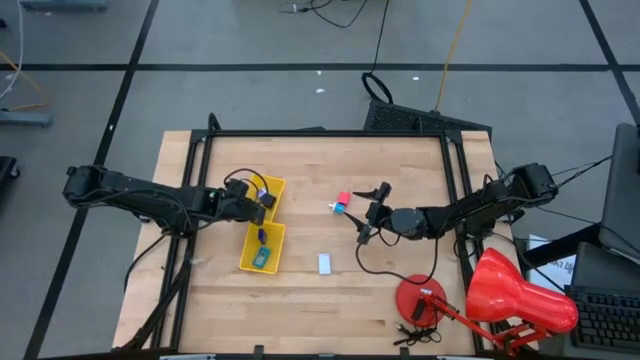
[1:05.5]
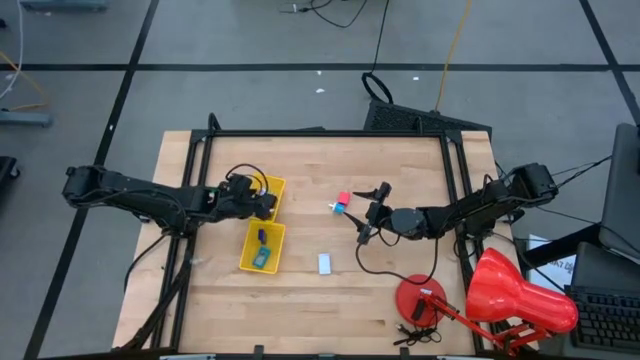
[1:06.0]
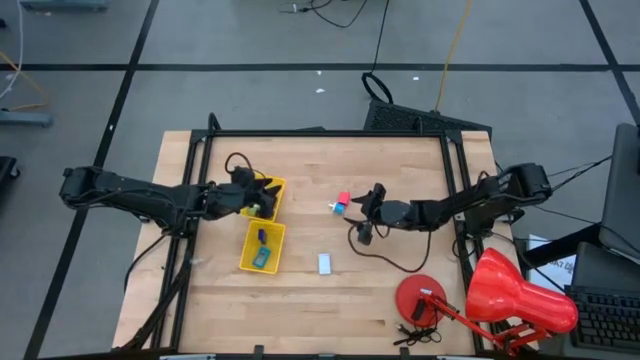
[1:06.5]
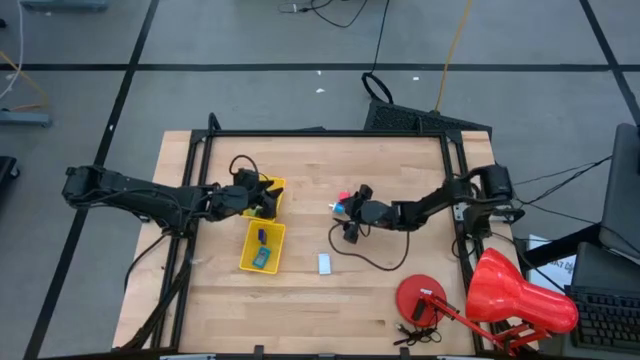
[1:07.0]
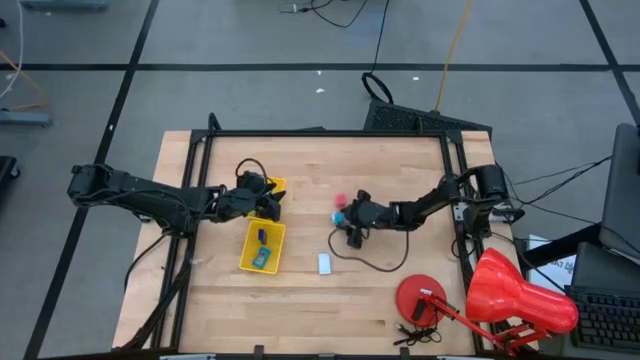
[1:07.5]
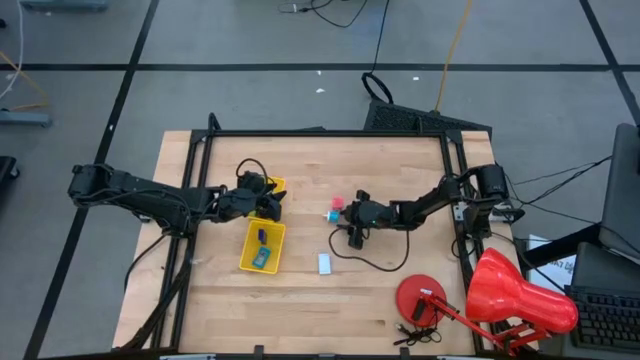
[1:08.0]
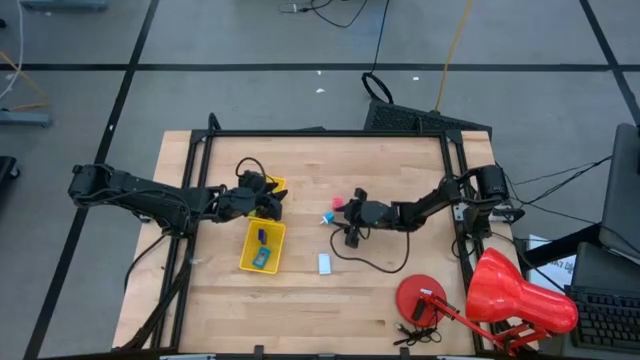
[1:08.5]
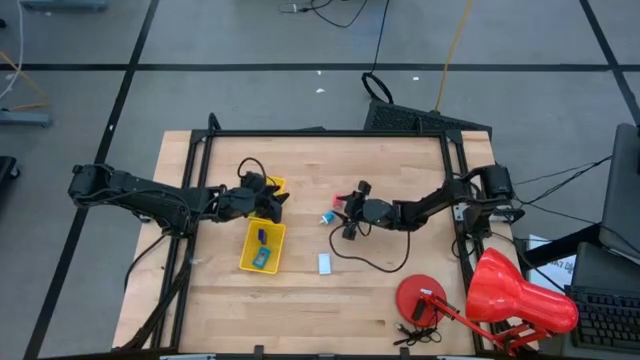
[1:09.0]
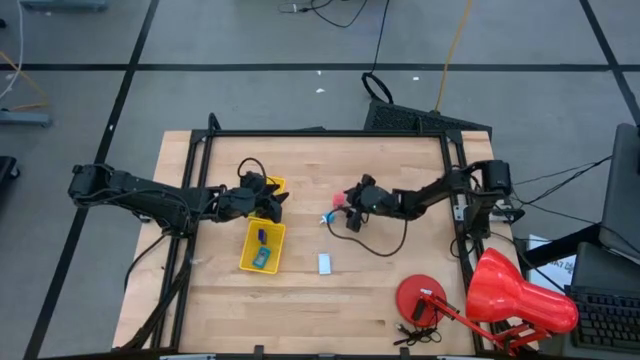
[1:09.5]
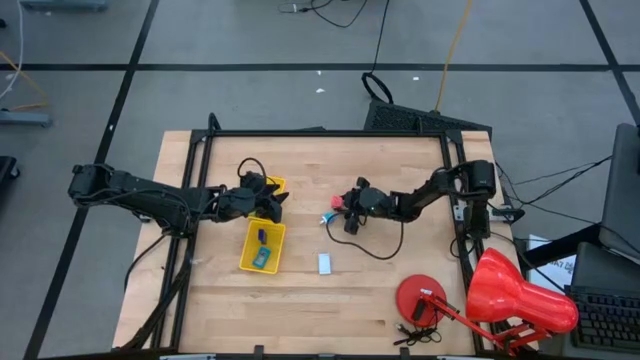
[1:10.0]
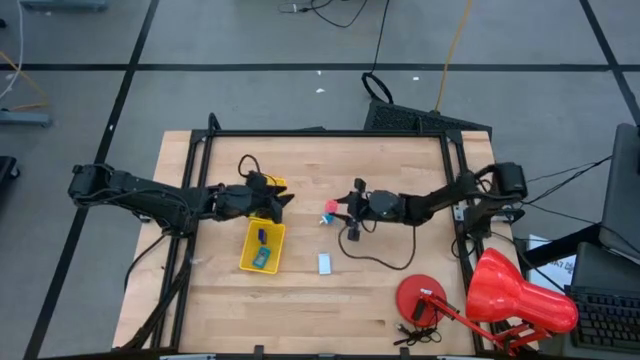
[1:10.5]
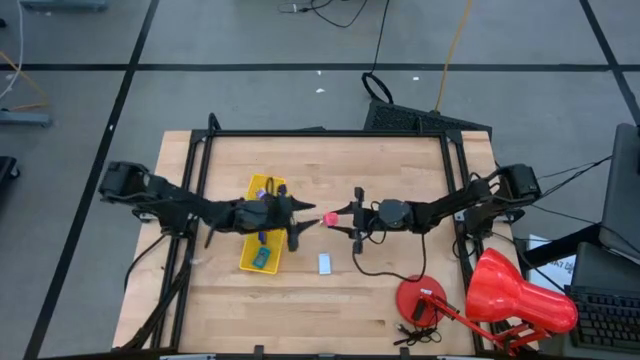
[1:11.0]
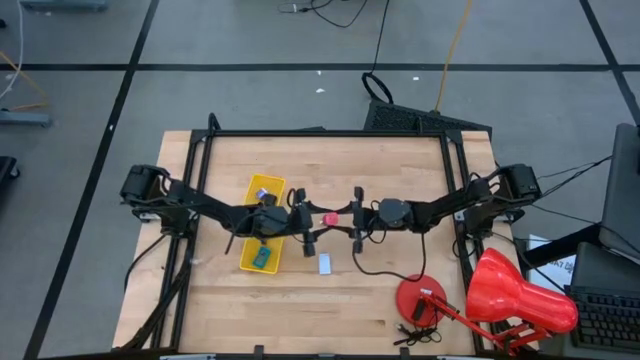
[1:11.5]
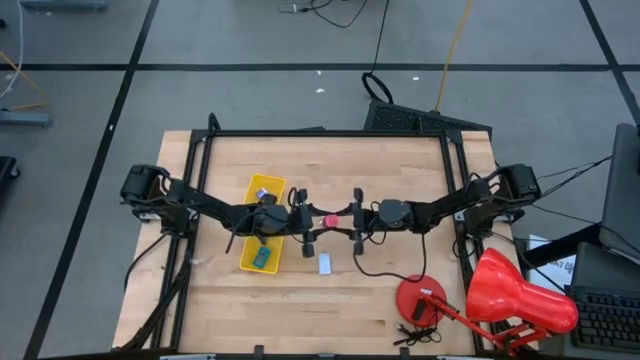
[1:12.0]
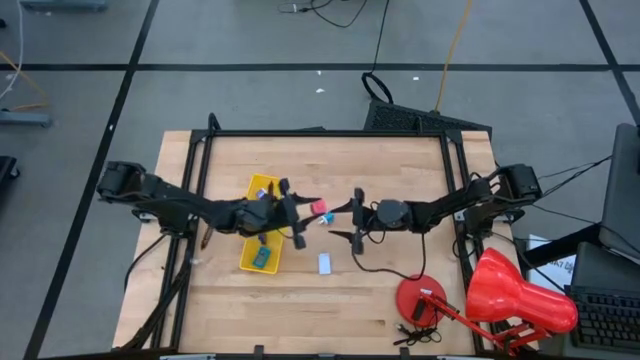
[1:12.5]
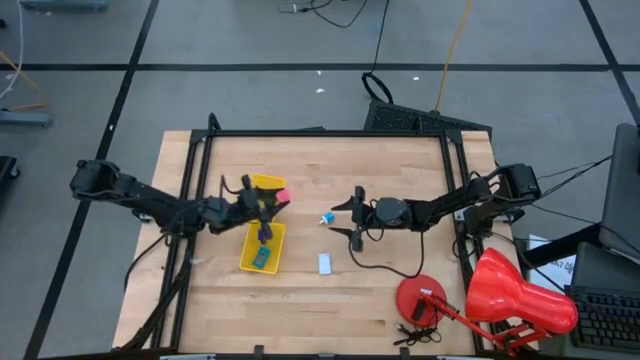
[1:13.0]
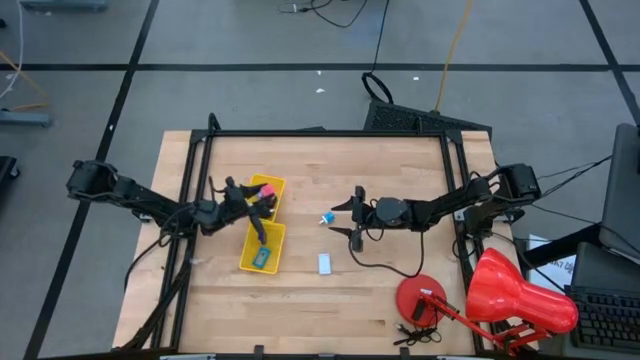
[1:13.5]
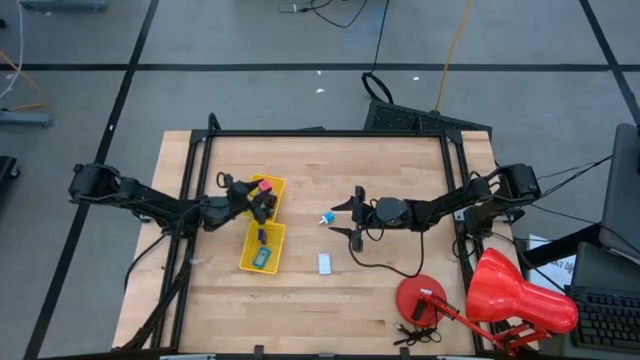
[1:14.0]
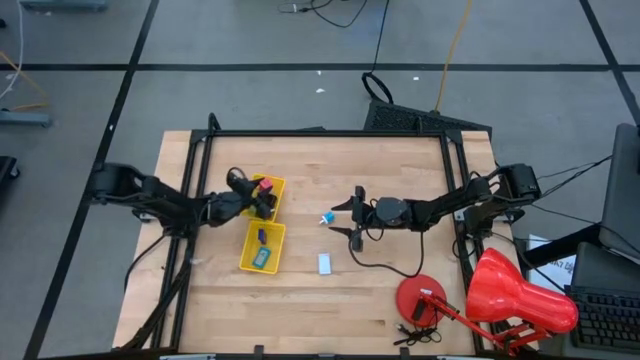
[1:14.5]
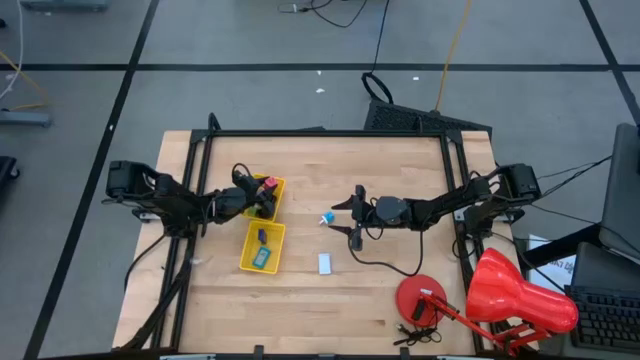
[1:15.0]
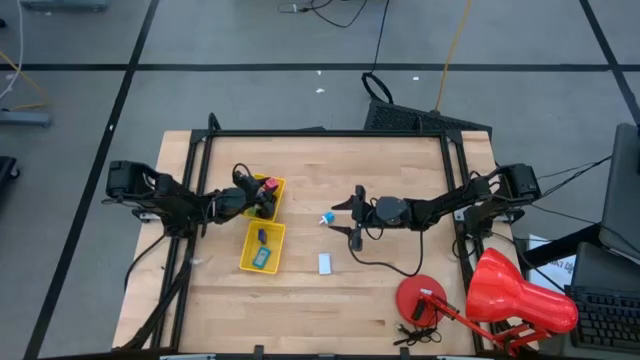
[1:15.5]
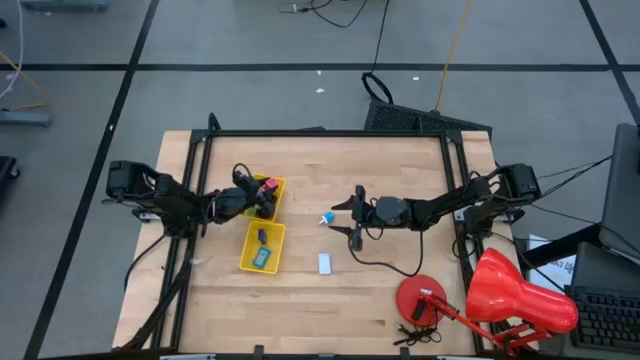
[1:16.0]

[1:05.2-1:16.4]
Task: Pick & Place Office items
Put the pink adapter into the top yellow basket

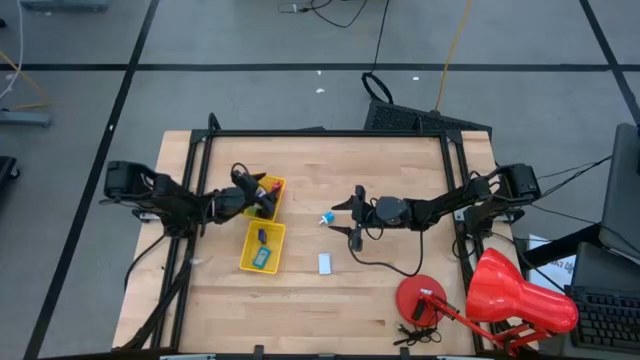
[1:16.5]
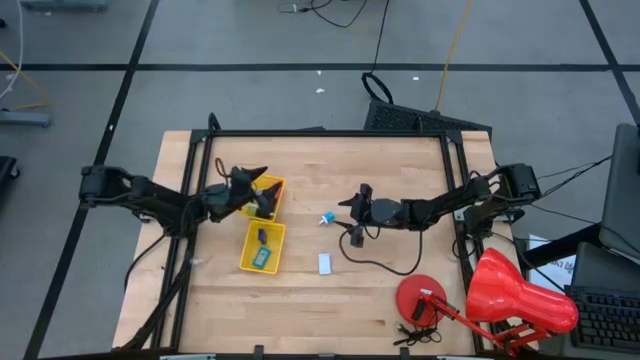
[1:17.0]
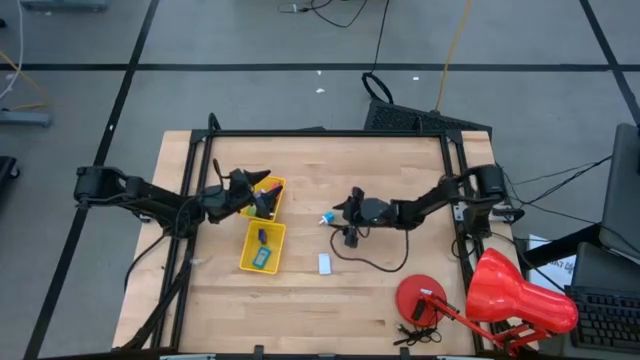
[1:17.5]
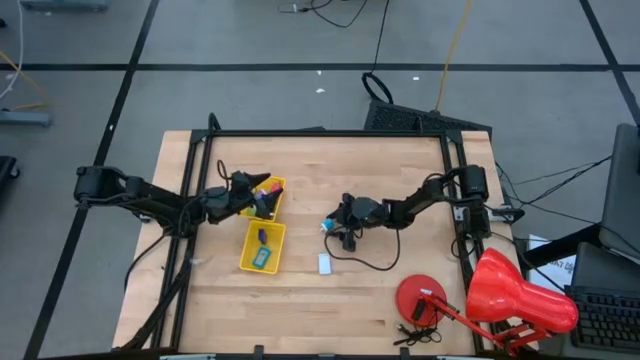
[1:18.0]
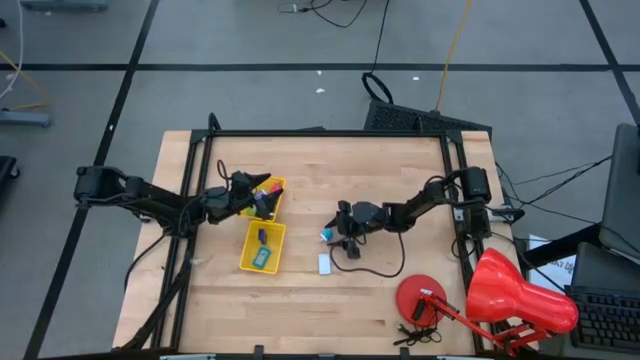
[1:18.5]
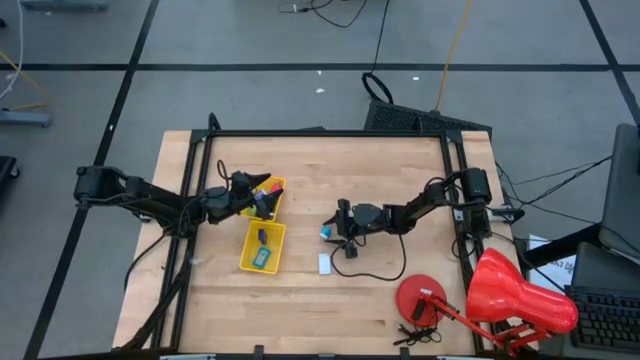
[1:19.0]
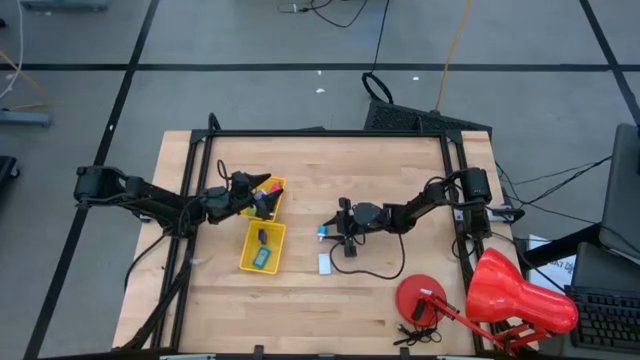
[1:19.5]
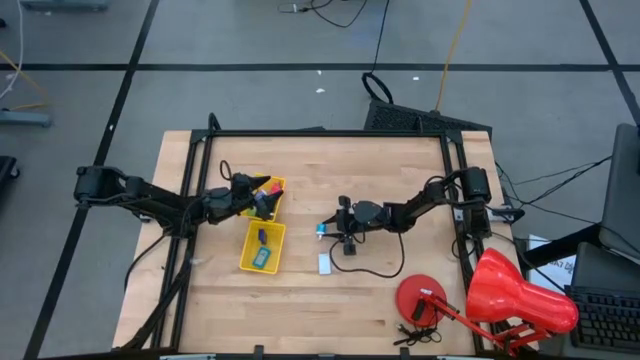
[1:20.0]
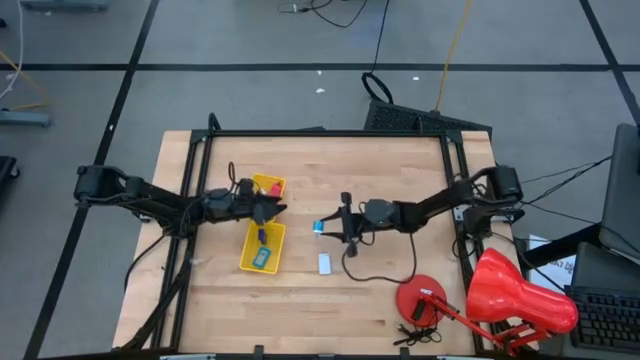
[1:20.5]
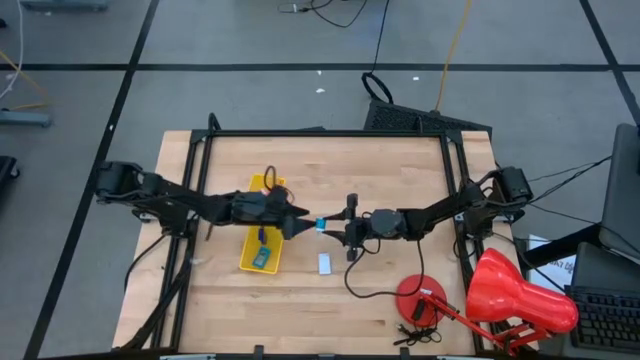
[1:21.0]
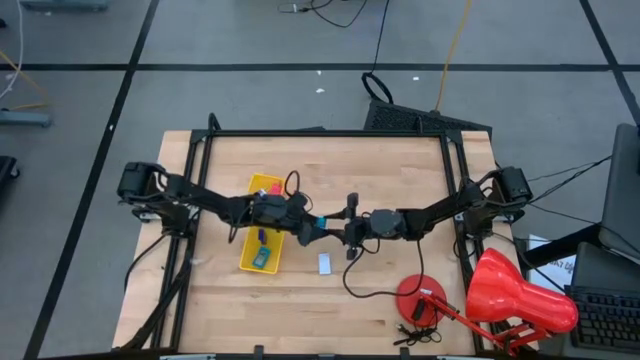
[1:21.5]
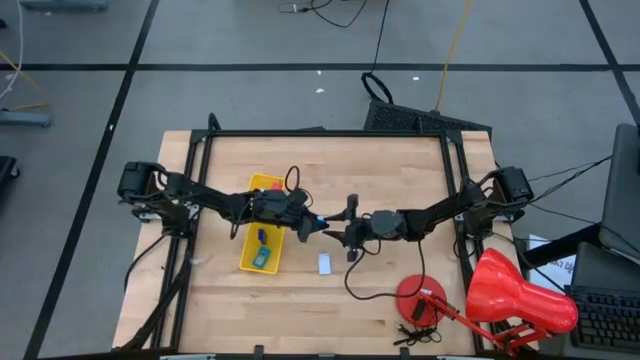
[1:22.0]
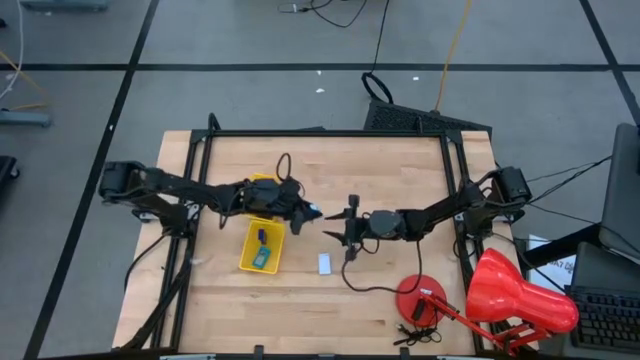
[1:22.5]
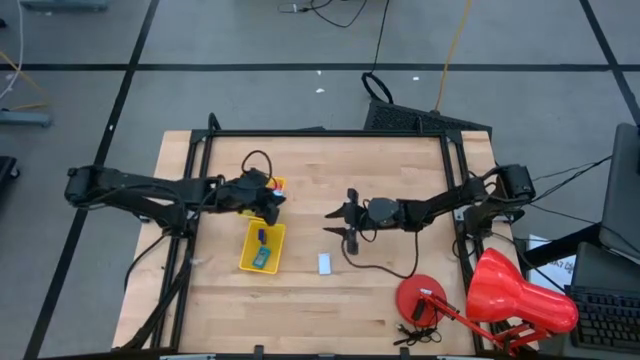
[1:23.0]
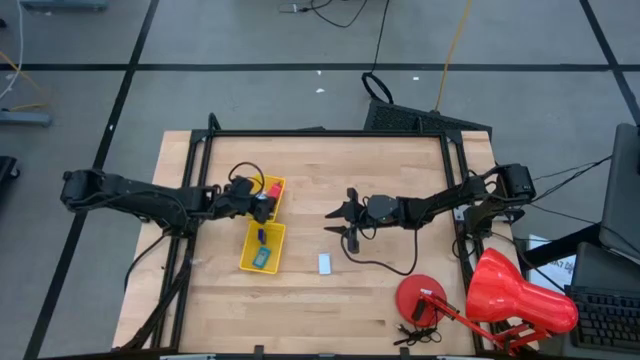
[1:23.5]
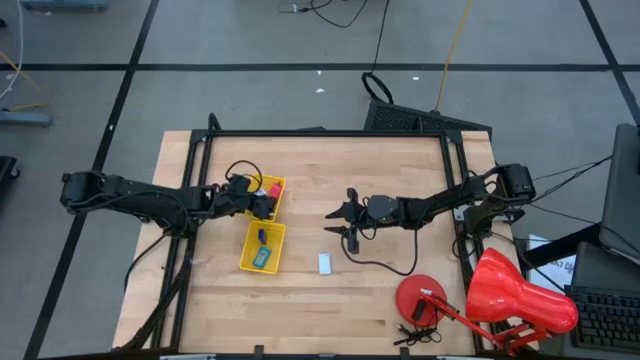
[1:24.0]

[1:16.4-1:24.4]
Put the light blue adapter into the top yellow basket

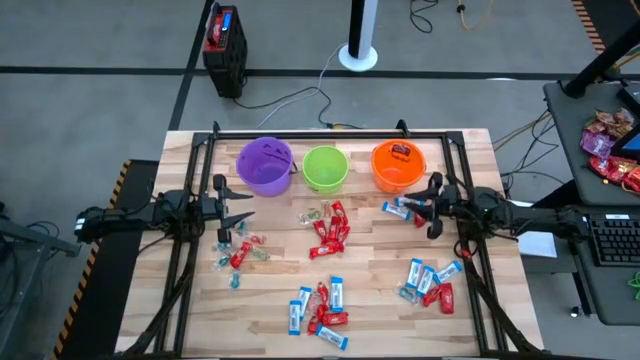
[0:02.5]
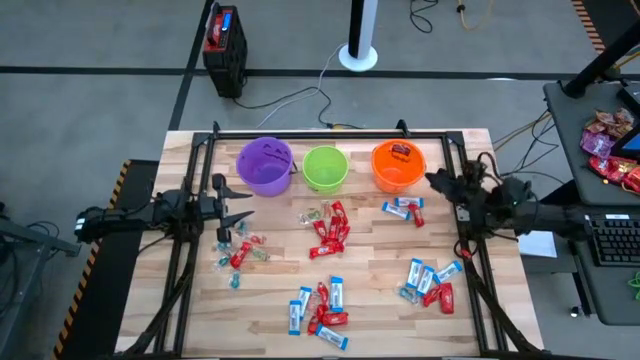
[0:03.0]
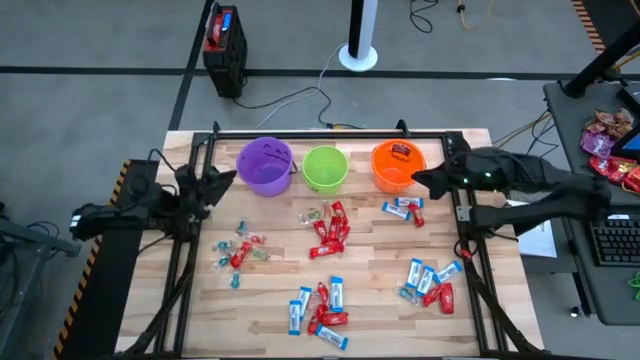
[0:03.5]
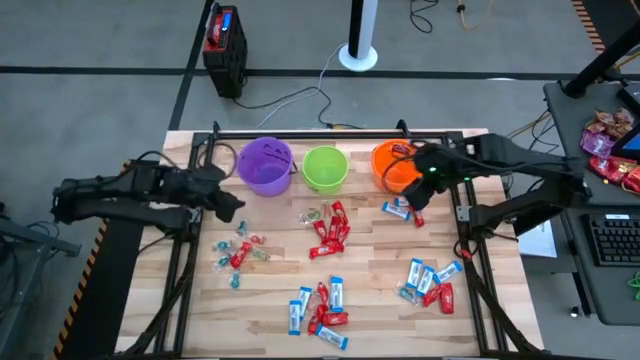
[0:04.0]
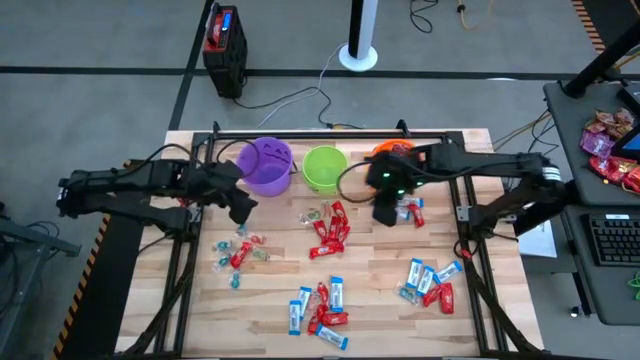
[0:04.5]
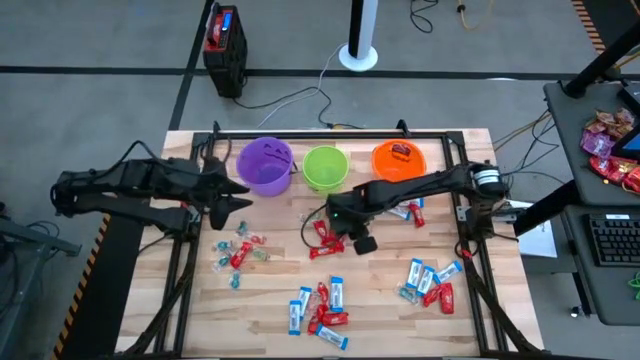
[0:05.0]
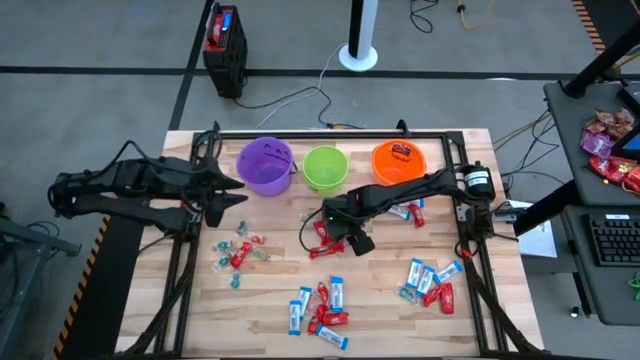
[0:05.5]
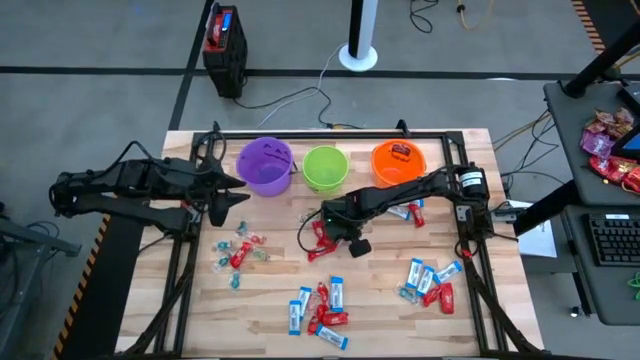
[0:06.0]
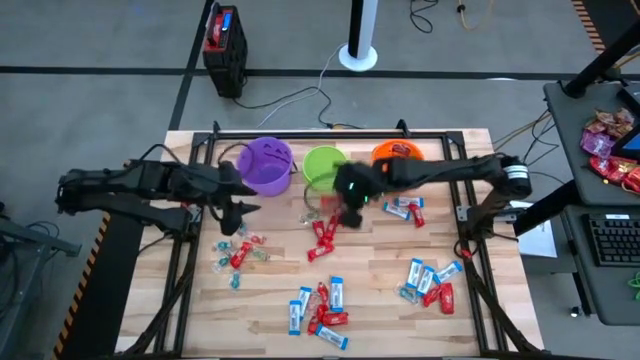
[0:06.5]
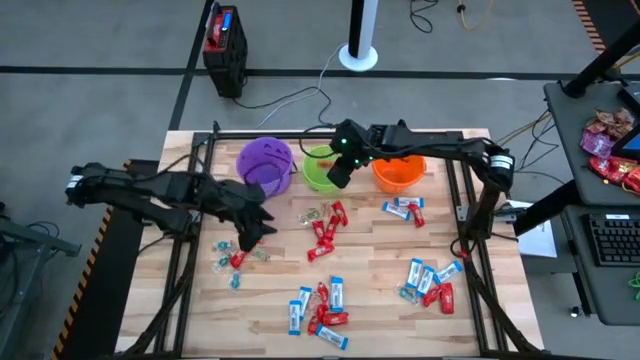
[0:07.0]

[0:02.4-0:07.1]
Task: Sort candy by brand, put in halloween buckets
Put the red chocolate bar into the green bucket
